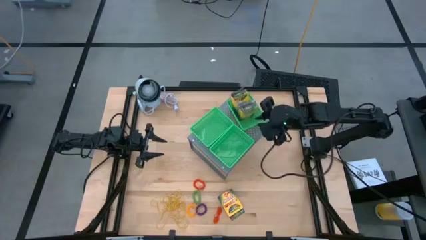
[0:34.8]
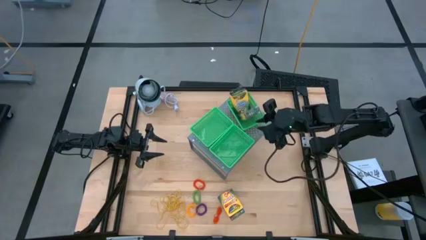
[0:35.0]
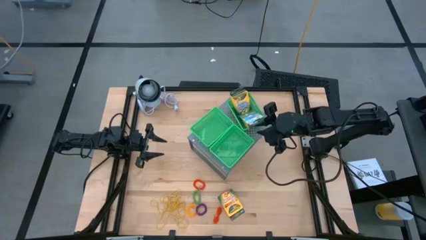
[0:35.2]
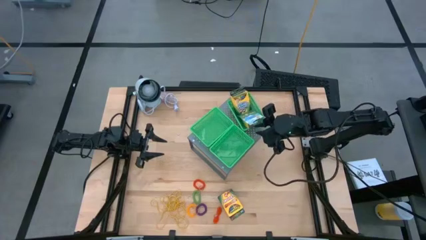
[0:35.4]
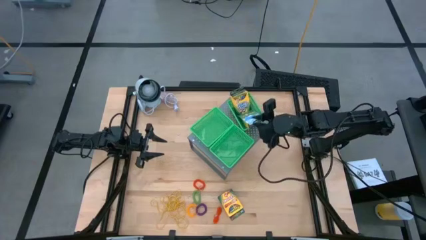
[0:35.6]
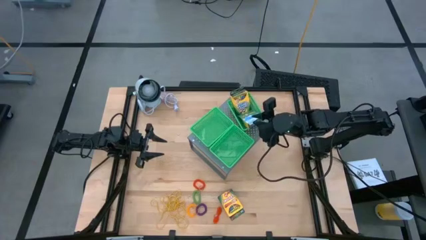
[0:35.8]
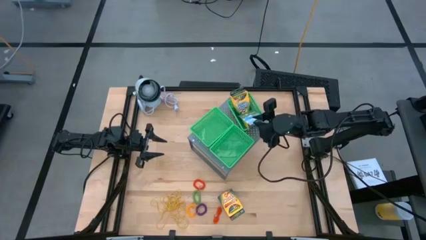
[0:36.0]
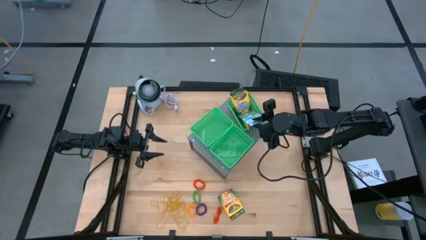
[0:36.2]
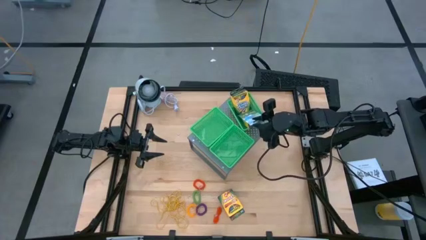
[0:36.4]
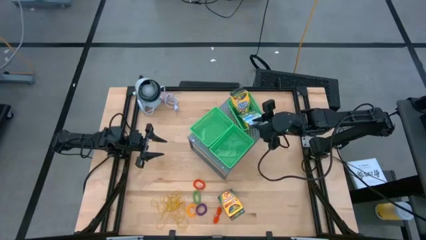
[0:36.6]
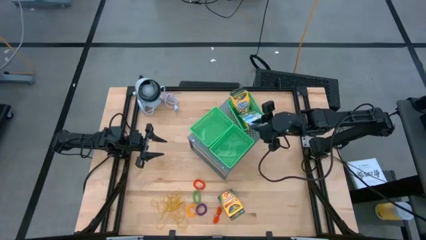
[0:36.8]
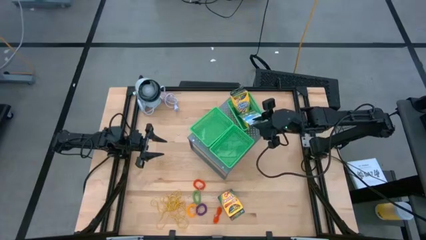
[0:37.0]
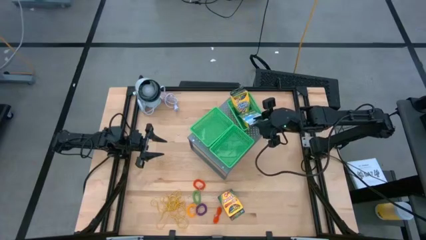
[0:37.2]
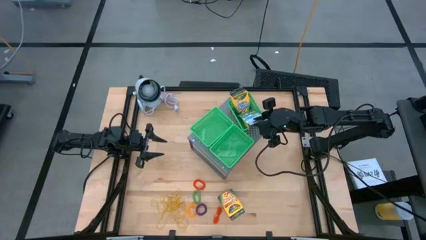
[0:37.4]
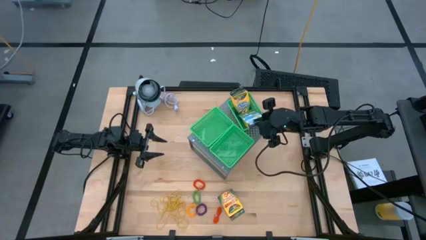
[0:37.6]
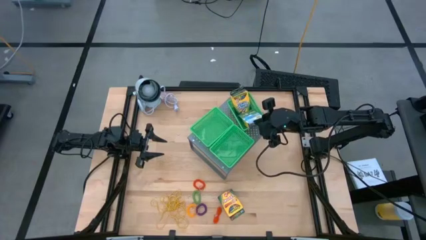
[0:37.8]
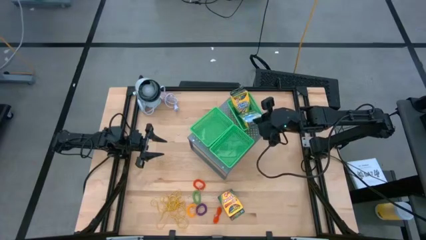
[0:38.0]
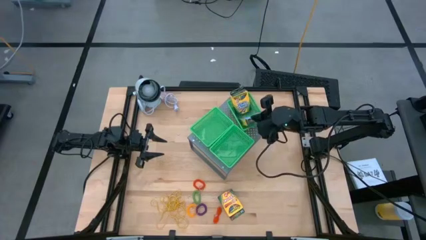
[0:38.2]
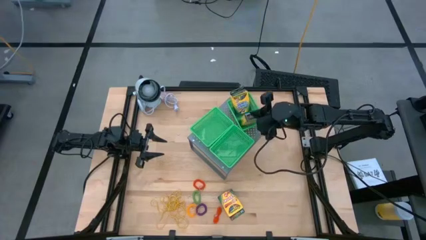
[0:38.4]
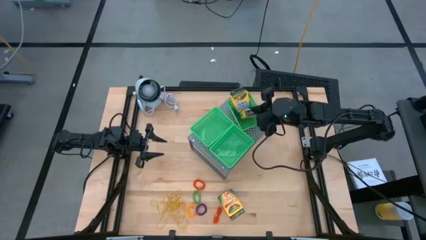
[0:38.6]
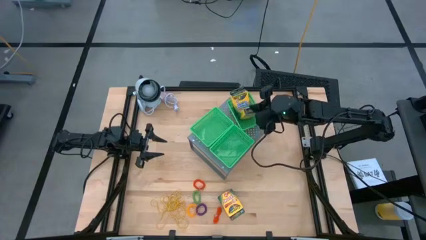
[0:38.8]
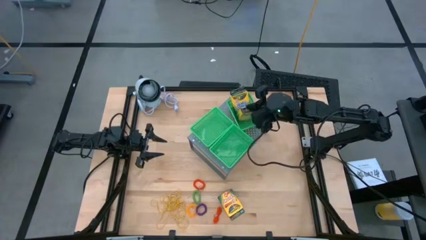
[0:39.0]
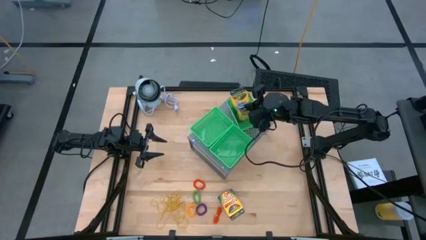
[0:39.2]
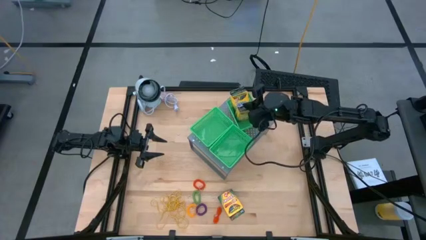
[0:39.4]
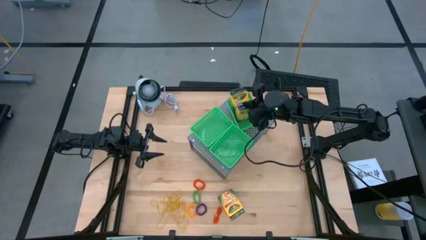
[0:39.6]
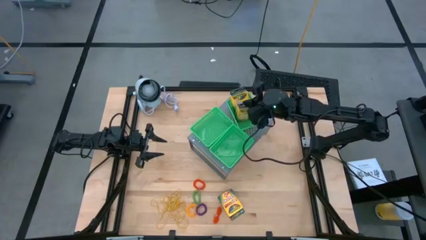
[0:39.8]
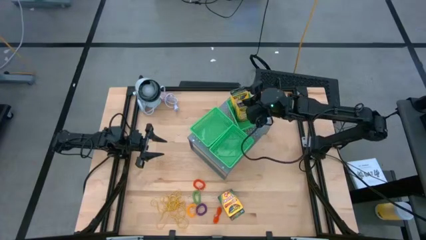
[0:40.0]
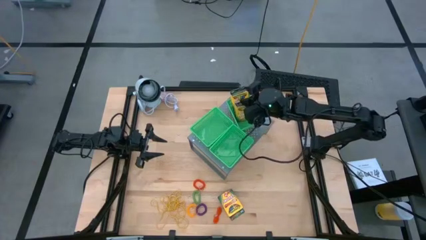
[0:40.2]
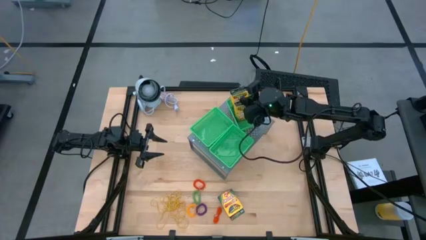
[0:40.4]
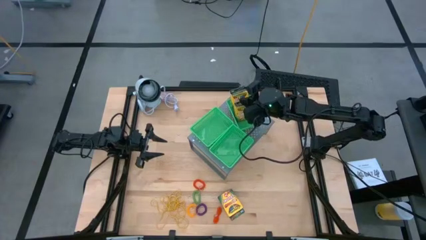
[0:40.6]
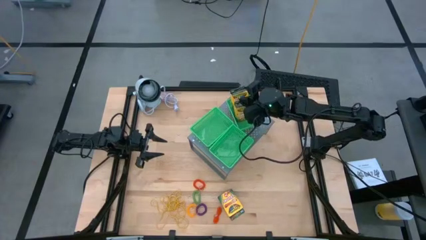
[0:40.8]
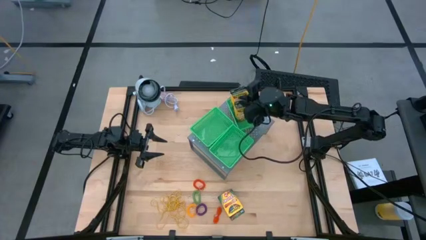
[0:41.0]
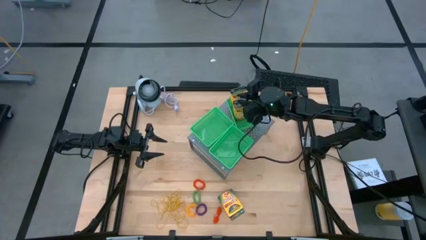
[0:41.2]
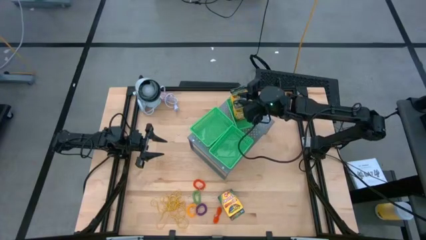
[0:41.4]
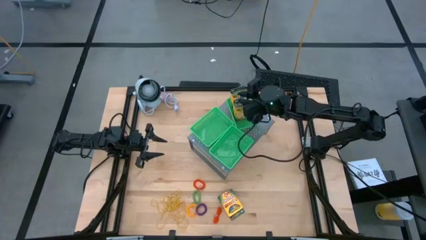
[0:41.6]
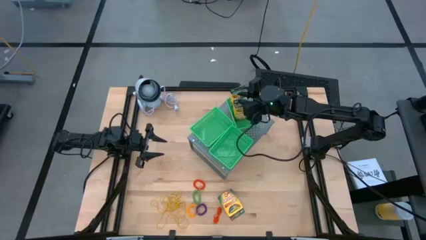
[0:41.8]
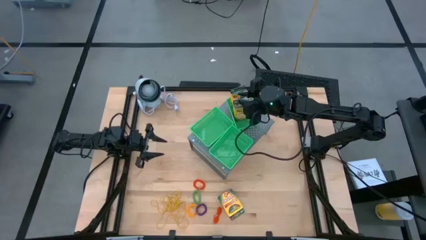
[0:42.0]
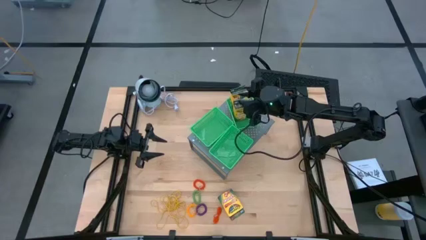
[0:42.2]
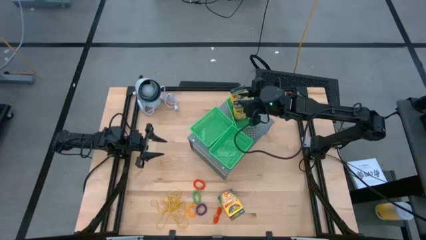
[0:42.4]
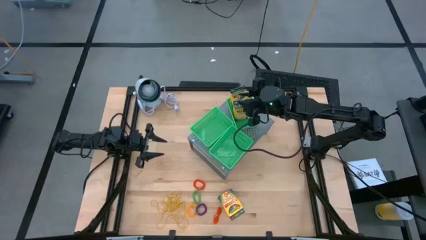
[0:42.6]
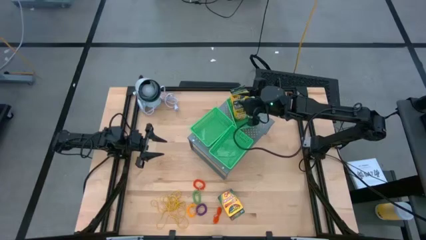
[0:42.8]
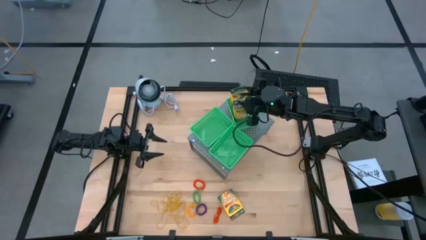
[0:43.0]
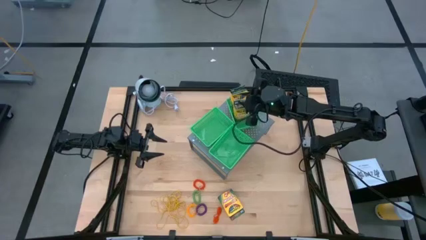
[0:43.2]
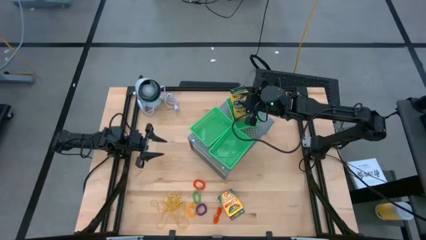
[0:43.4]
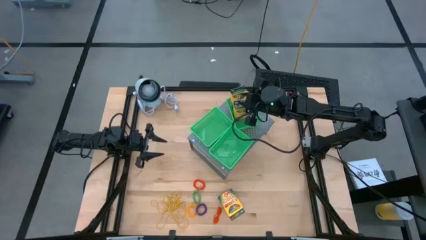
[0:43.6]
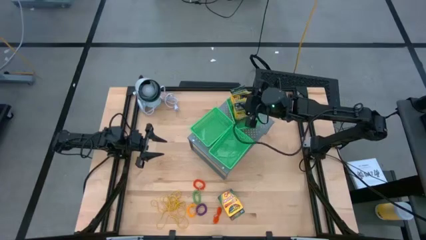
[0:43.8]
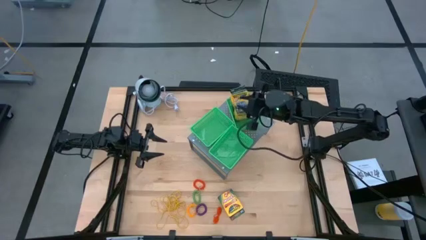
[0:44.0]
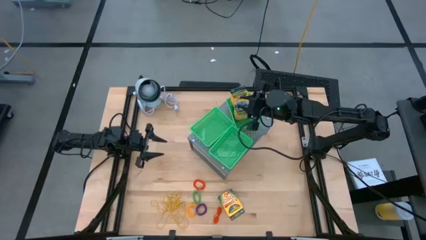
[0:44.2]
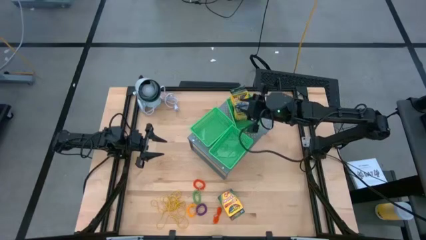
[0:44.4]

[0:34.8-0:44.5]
Task: Pick & Place Office Desk Supplies
Adjust the yellow crayon box on the shelf

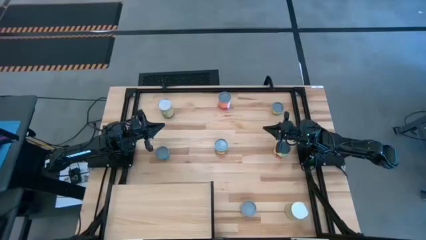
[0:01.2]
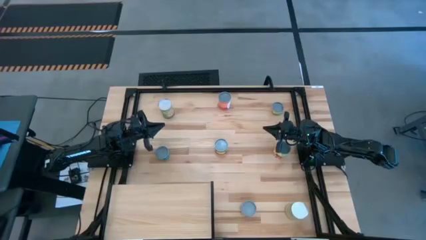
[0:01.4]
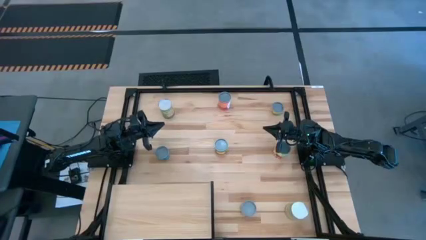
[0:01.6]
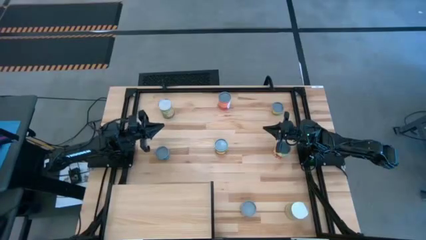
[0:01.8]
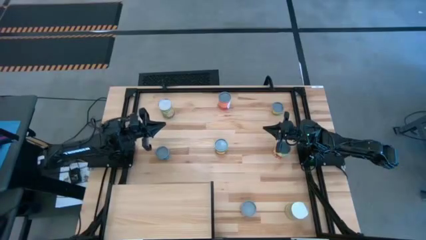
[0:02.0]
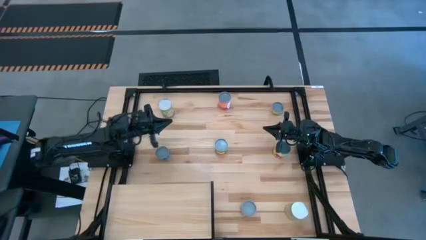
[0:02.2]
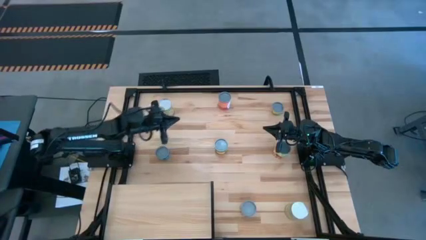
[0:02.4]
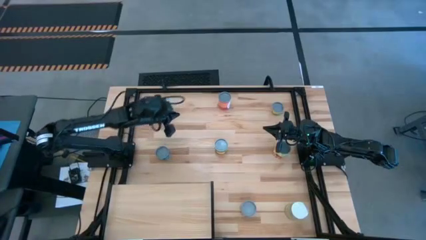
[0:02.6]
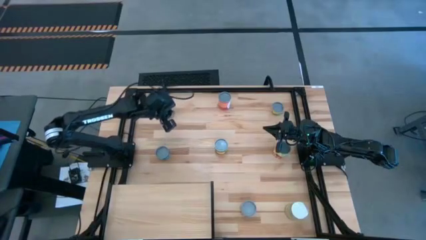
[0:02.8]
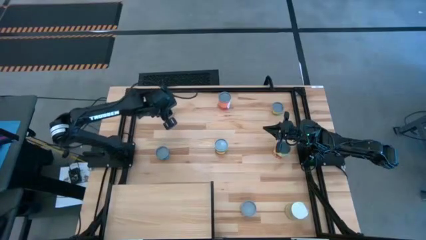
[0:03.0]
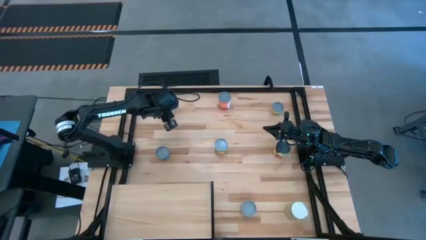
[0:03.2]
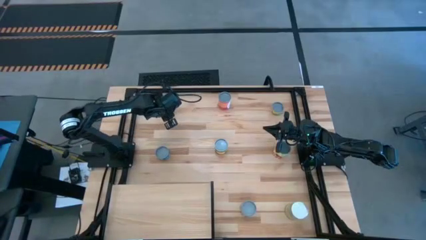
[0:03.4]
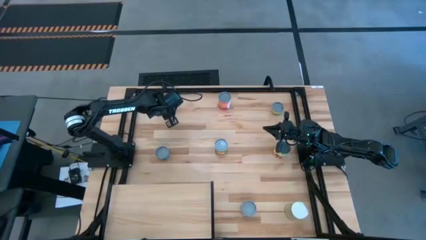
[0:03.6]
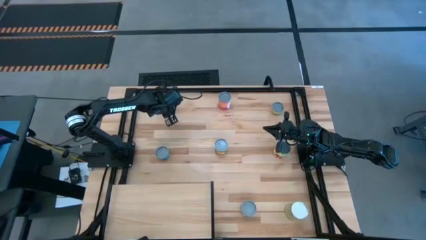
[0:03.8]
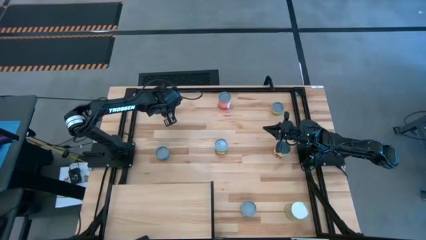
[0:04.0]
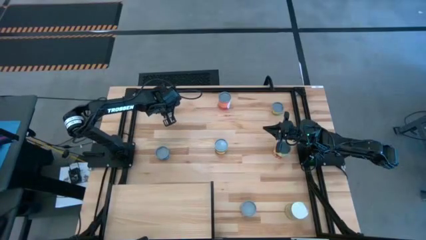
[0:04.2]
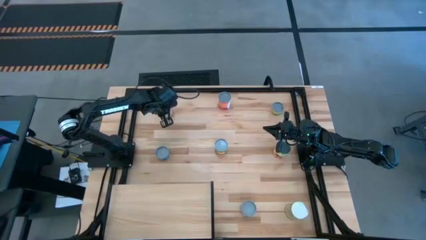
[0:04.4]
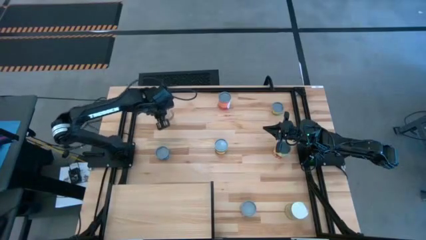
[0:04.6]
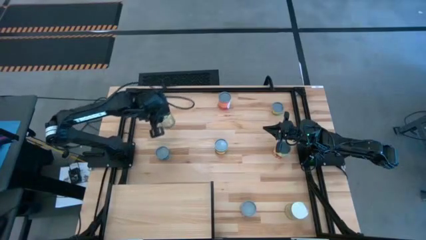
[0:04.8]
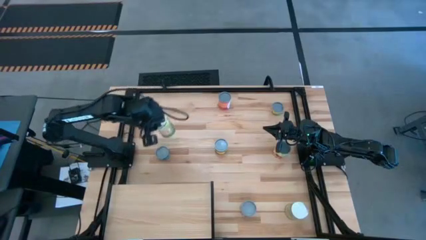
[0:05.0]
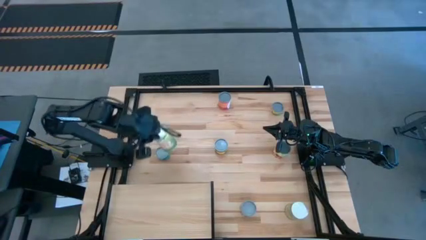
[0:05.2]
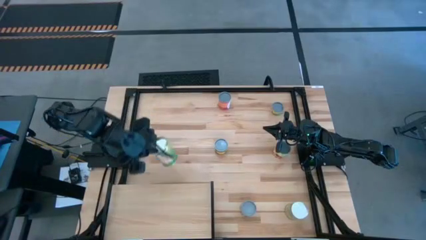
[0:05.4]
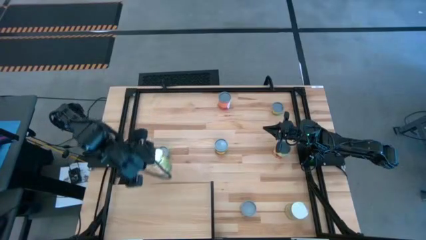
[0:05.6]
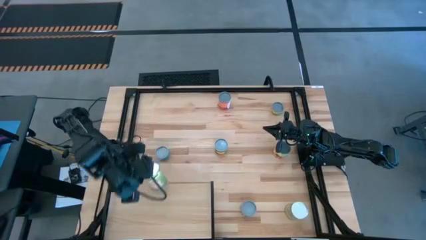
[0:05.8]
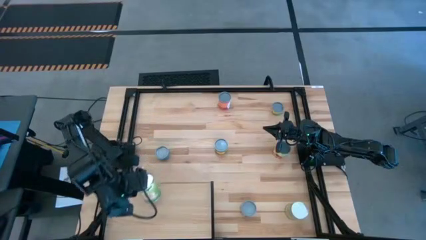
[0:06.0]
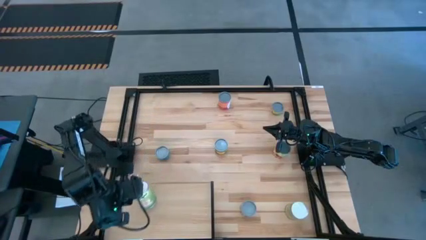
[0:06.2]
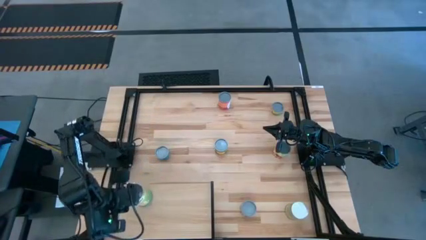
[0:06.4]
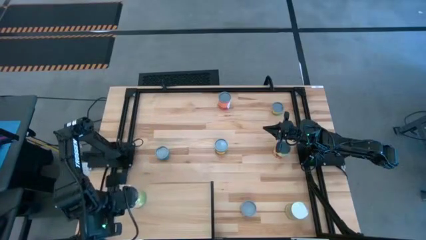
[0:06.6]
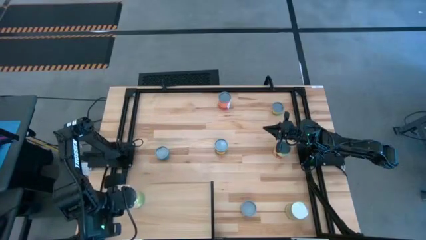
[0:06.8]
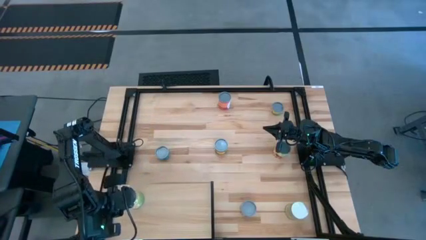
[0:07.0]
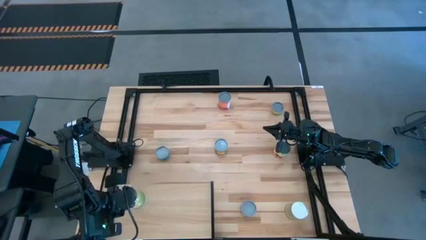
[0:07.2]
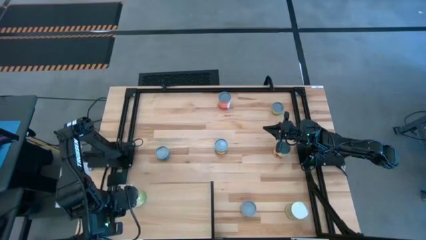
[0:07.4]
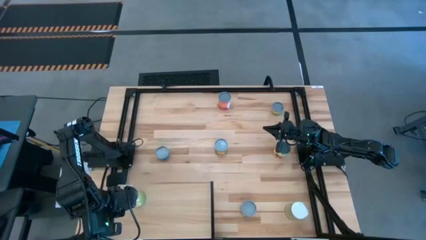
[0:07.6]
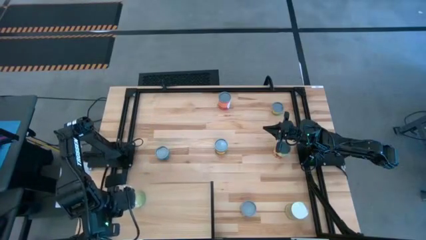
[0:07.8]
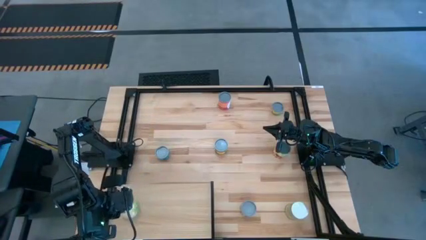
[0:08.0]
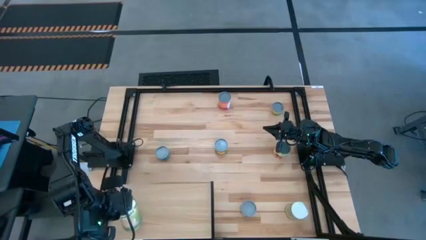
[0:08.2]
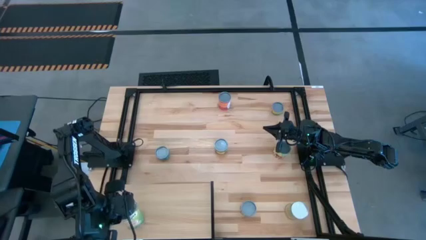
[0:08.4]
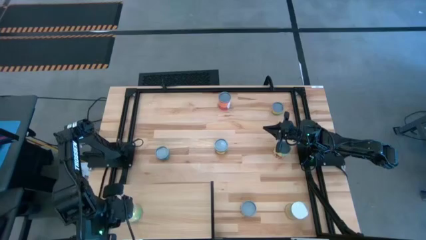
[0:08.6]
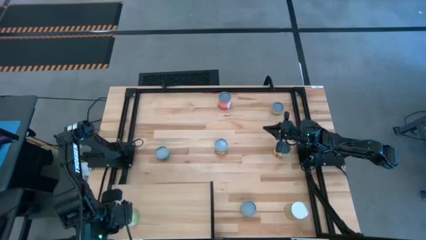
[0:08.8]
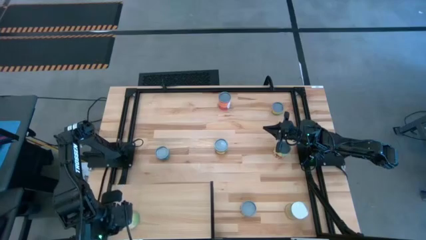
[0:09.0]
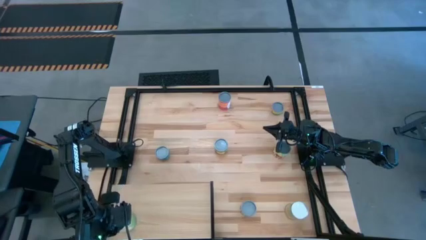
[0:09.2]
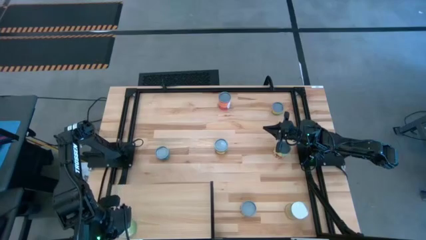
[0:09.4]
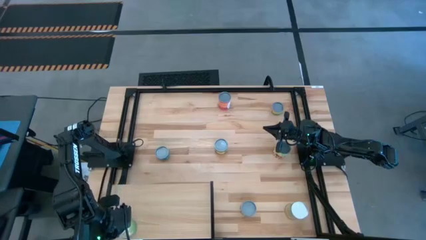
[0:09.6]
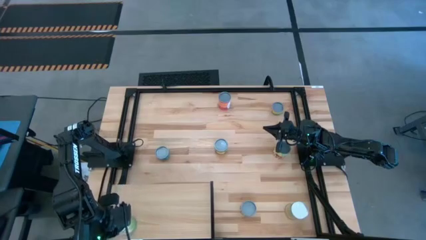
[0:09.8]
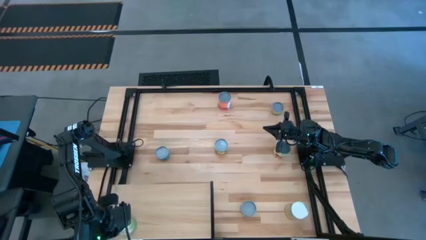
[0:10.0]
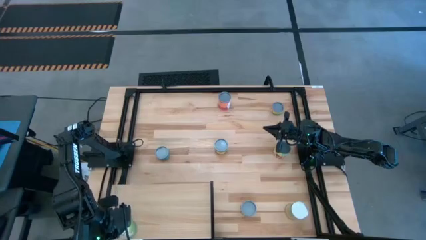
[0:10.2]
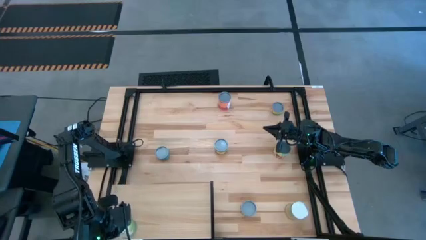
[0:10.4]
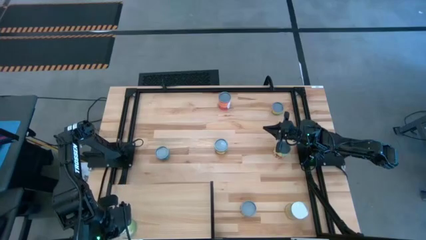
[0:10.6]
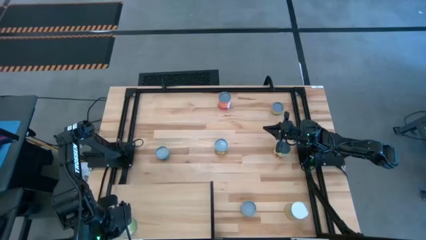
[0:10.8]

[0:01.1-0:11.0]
Task: Pick and place cans onto a shelf
Put the canned oranges on the shelf
